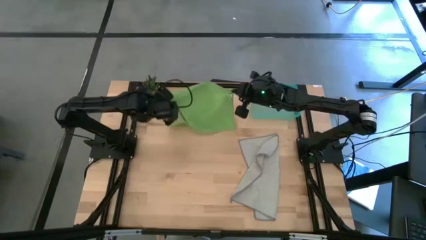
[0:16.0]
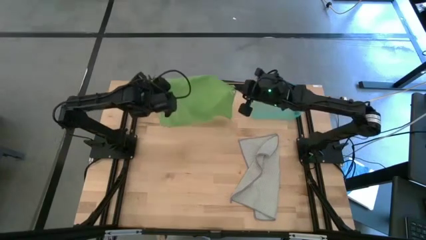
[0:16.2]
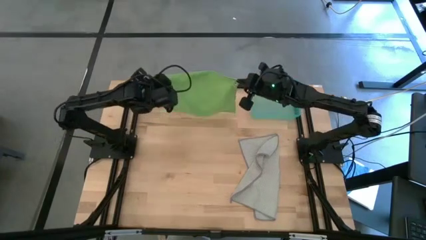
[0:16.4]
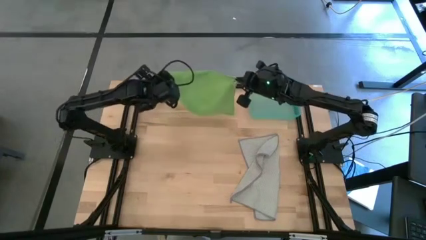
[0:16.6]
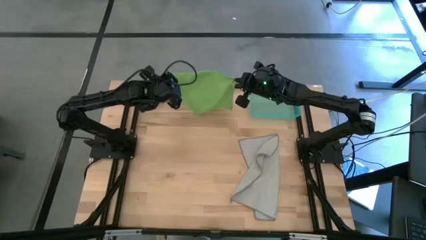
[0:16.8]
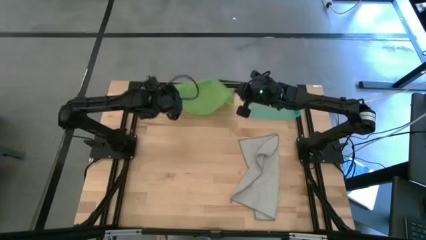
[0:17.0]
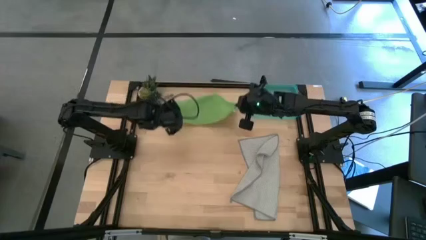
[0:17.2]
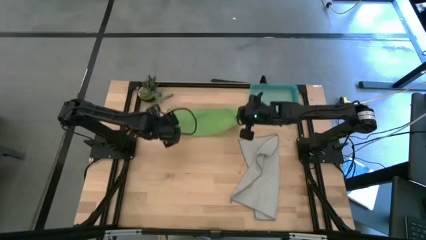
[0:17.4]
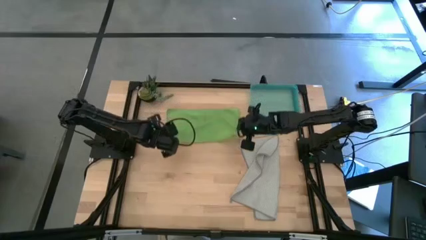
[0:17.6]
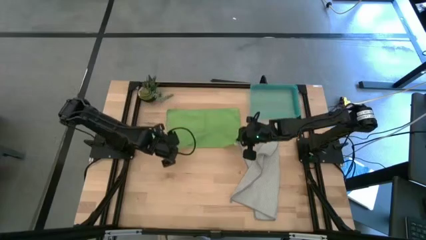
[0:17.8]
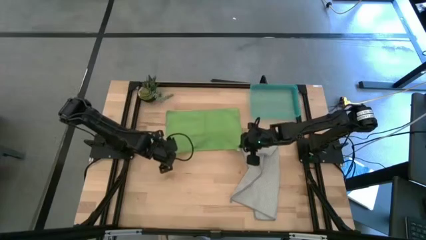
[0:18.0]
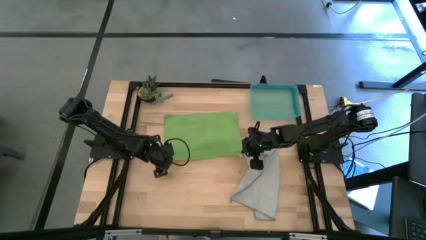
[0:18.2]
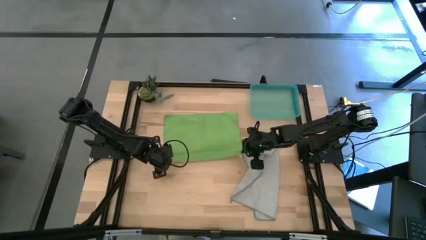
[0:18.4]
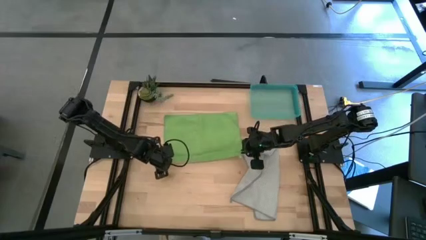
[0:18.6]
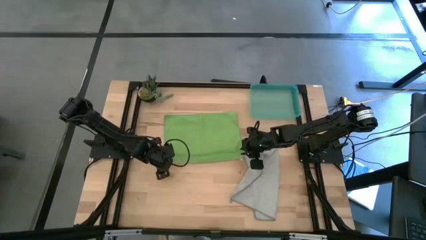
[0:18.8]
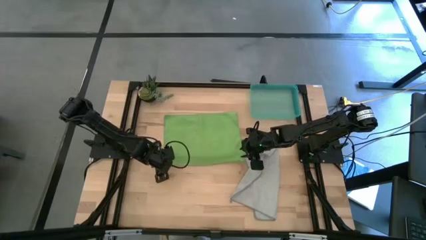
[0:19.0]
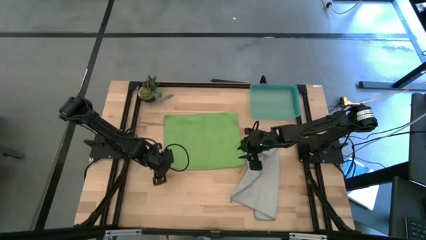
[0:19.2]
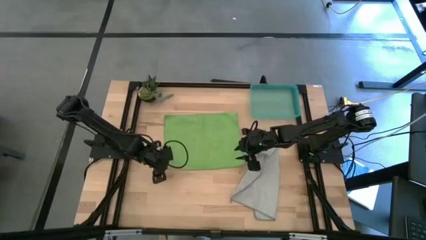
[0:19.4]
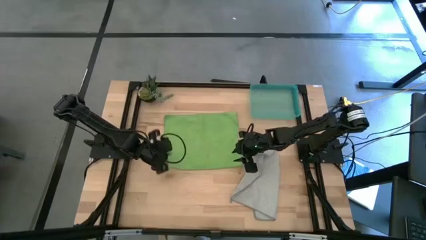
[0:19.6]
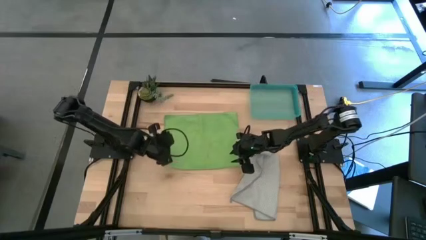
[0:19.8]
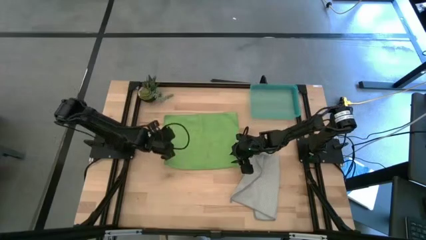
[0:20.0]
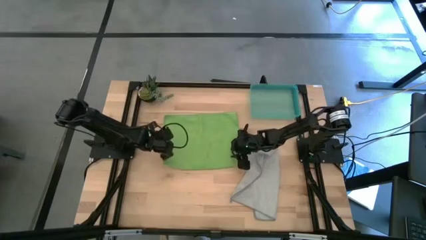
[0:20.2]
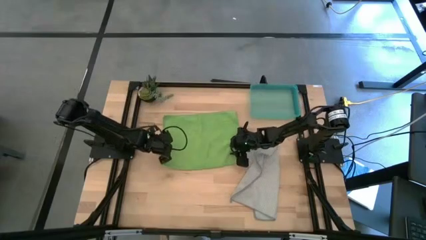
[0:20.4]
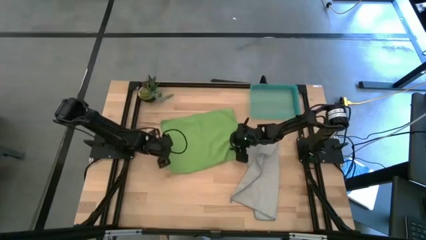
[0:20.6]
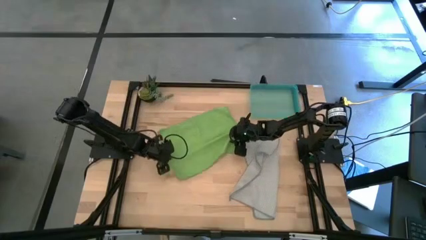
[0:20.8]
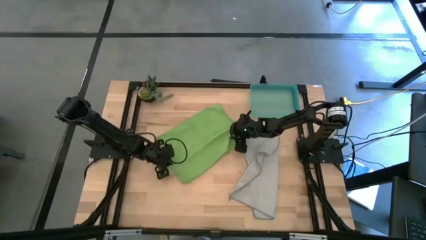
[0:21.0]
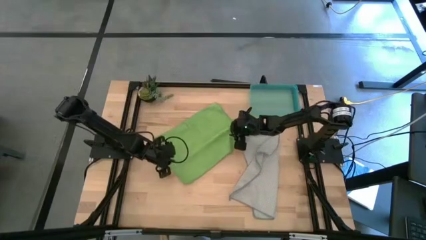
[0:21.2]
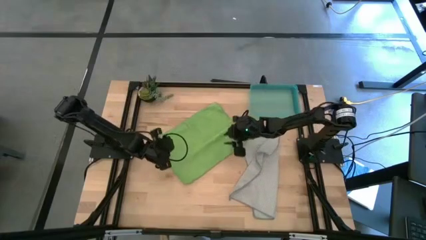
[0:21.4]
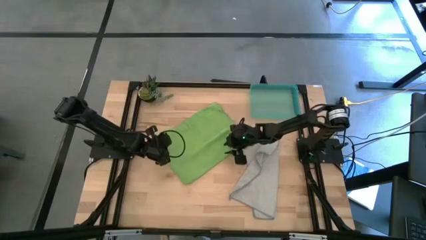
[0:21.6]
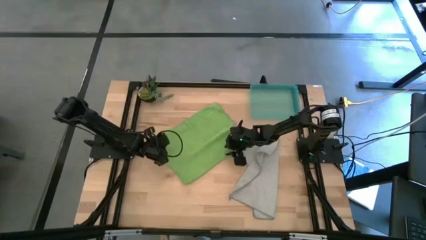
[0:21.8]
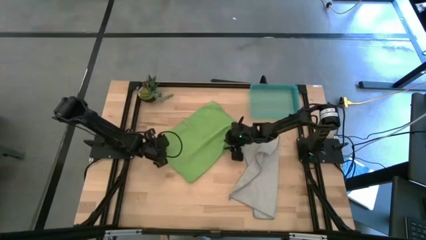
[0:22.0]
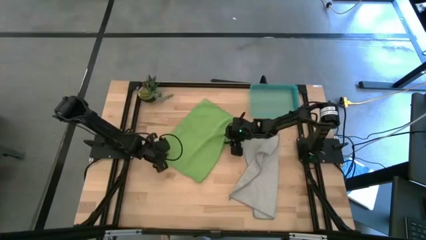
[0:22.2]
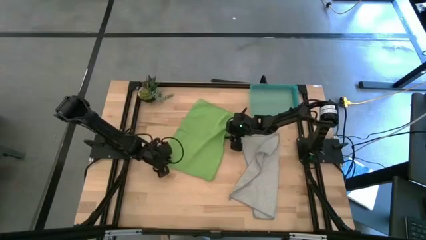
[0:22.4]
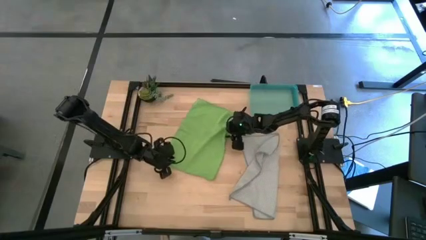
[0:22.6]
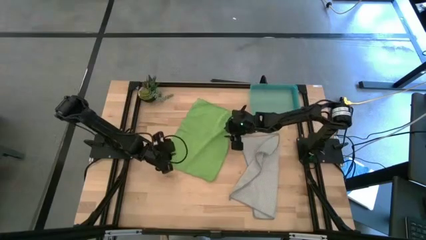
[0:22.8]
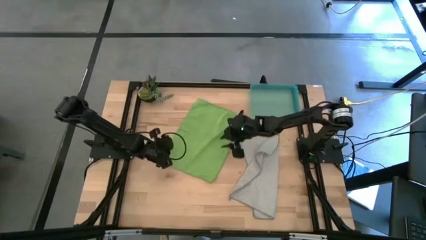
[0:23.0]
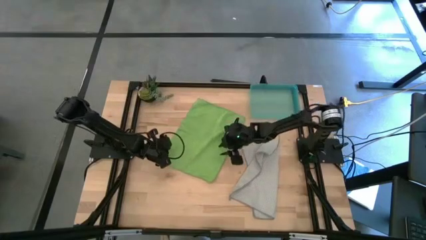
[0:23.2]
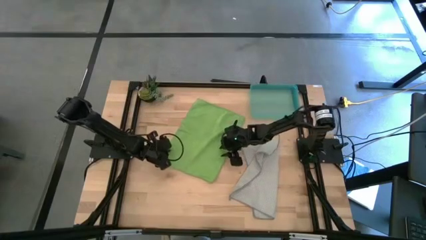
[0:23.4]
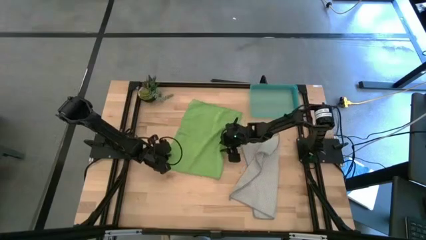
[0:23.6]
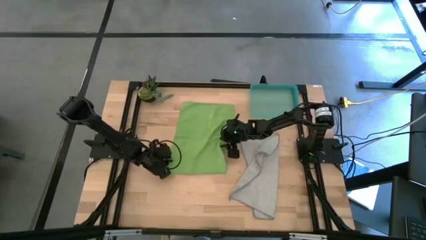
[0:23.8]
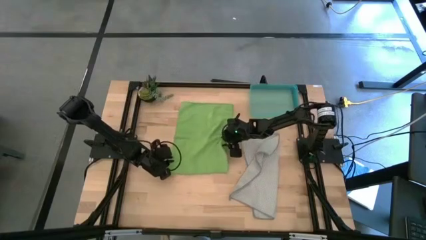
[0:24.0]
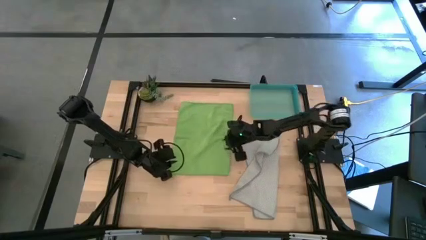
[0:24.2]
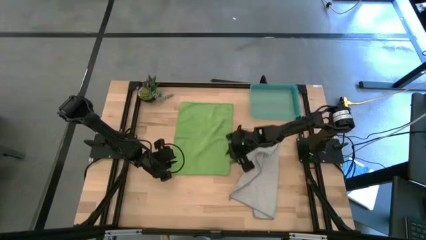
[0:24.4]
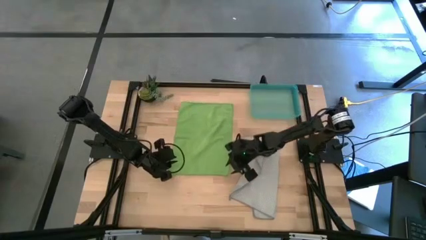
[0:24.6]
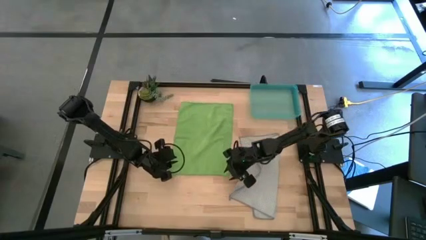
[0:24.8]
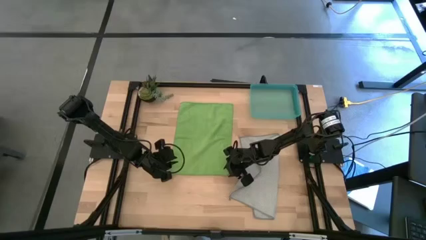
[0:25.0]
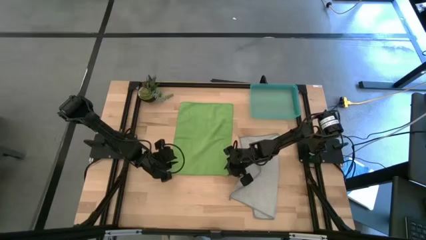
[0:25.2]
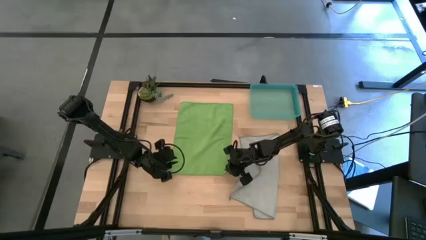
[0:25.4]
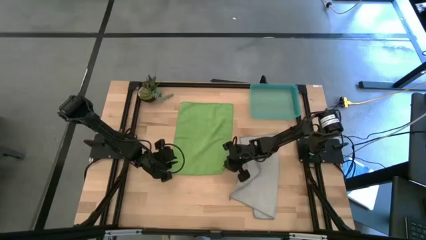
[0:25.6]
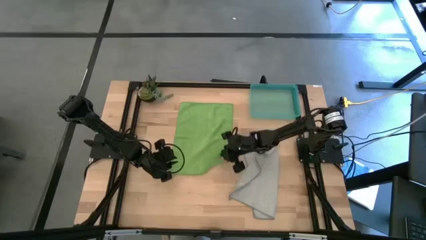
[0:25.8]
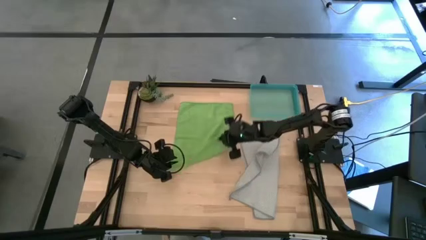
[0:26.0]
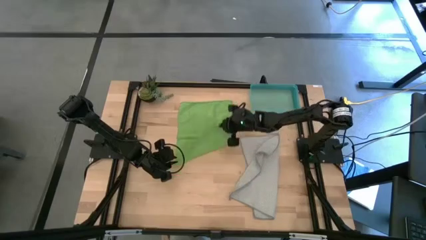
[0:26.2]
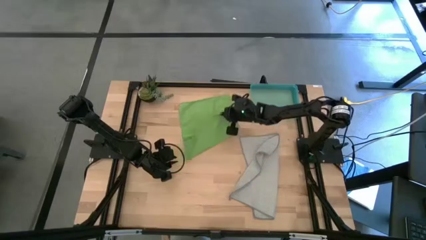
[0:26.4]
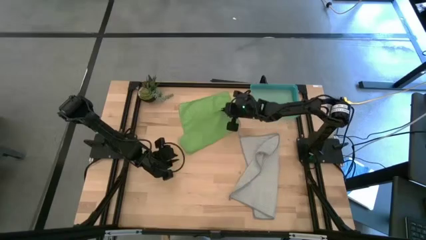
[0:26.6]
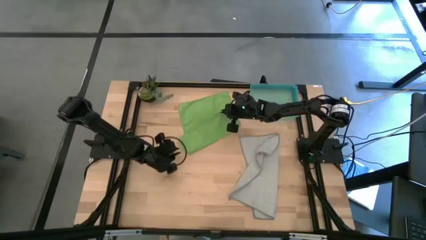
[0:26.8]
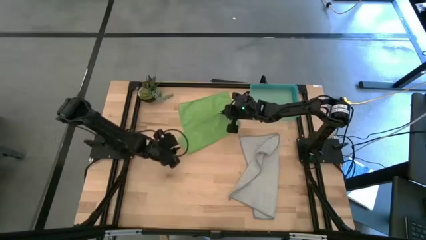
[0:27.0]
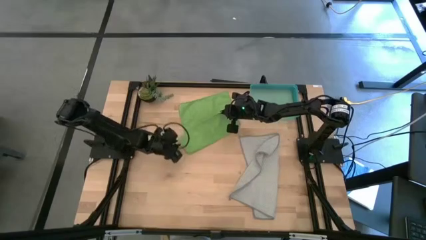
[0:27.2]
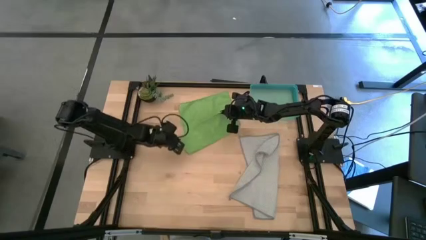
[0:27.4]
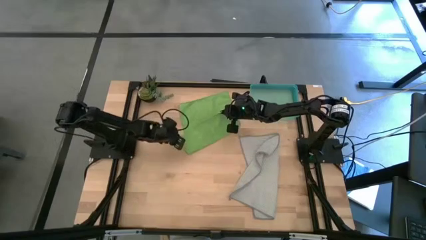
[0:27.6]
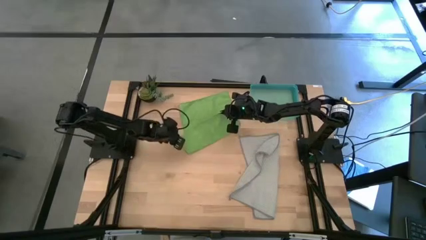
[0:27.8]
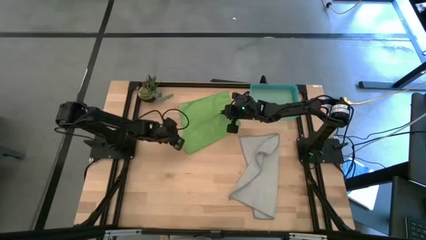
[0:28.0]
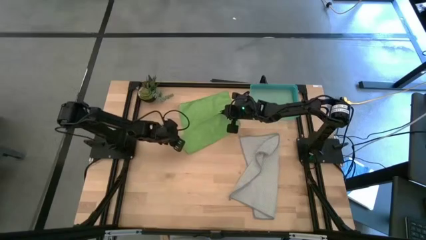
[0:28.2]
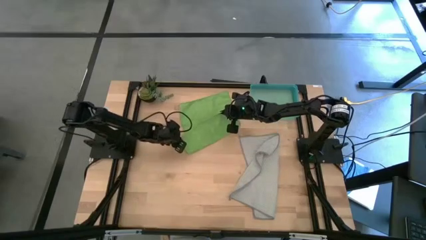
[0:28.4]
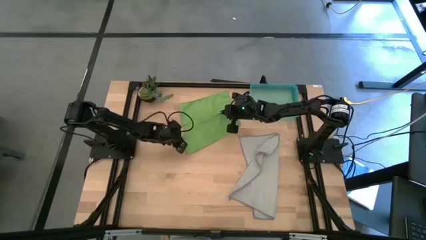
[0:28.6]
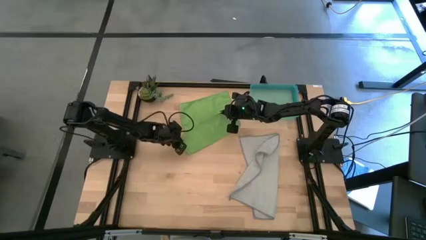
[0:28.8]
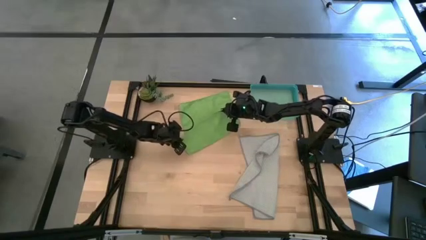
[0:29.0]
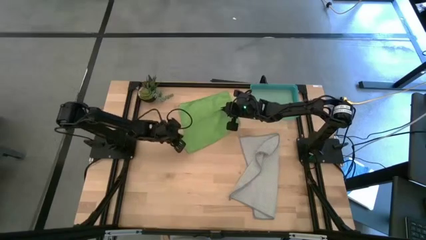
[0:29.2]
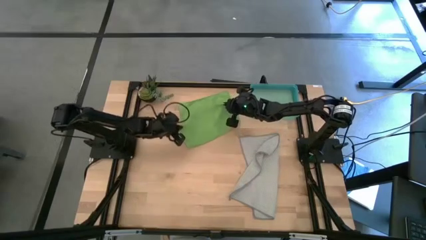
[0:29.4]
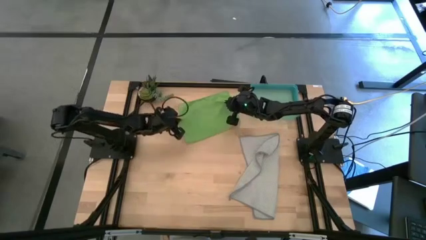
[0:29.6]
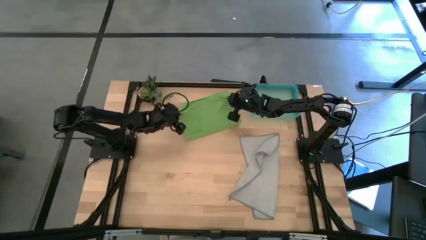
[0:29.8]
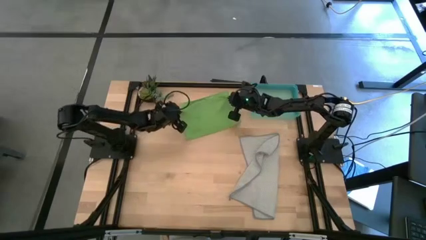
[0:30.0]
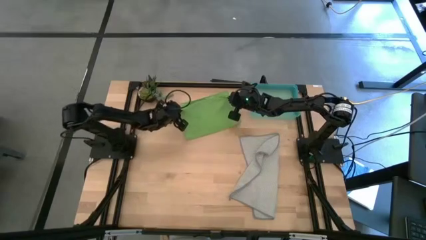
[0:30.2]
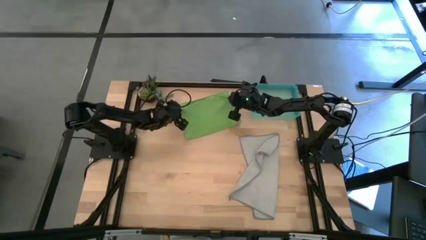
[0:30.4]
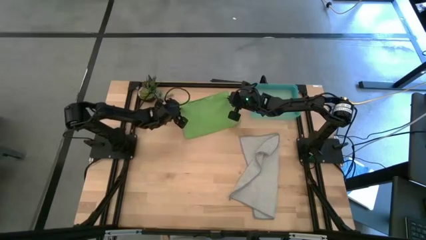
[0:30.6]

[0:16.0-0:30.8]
Task: Roll microfiber towels into tight, uniform cylinder then place into a basket
Fold the green microfiber cloth
